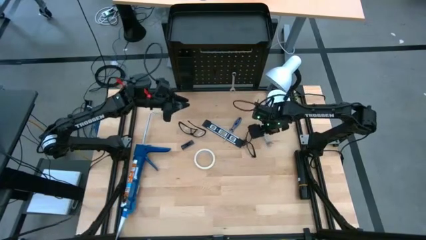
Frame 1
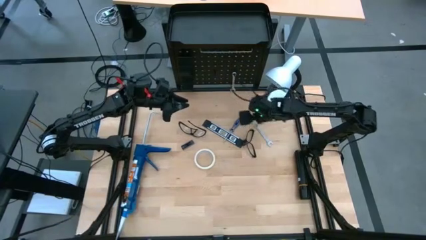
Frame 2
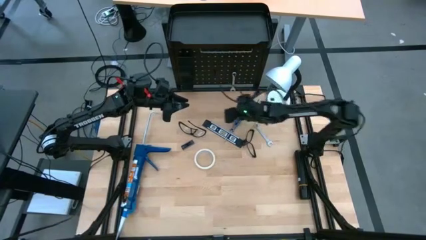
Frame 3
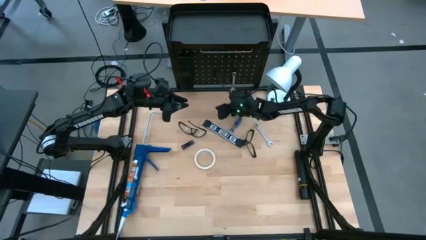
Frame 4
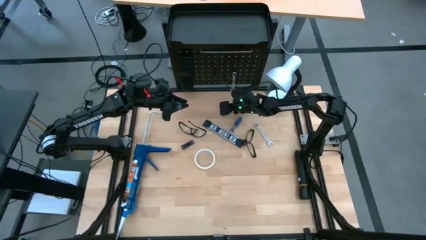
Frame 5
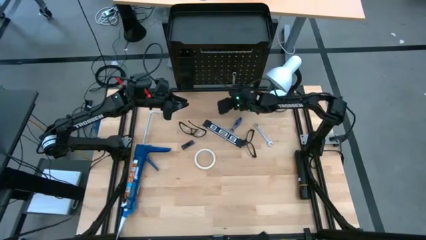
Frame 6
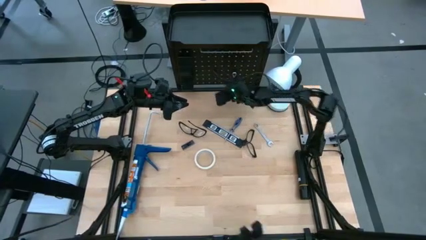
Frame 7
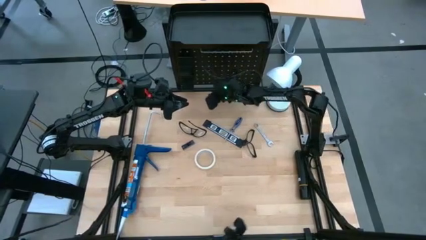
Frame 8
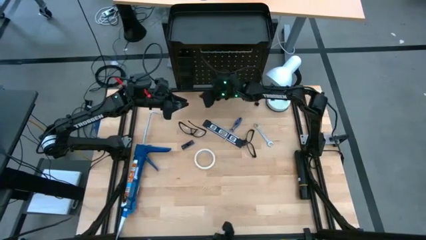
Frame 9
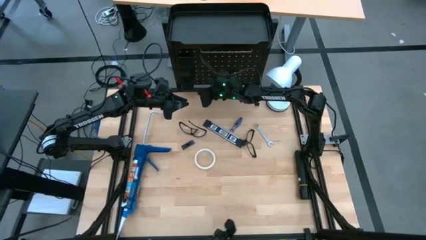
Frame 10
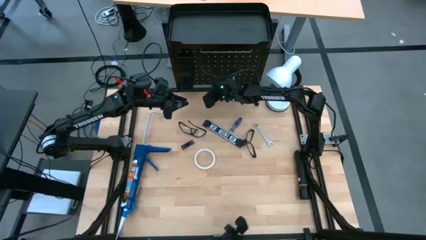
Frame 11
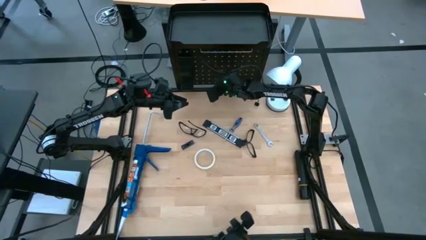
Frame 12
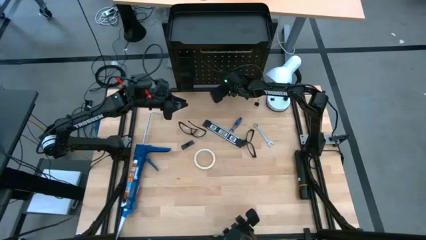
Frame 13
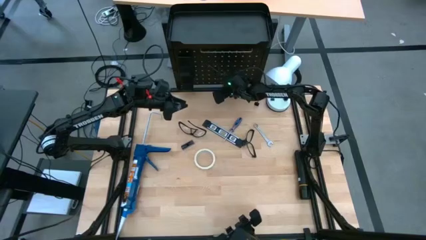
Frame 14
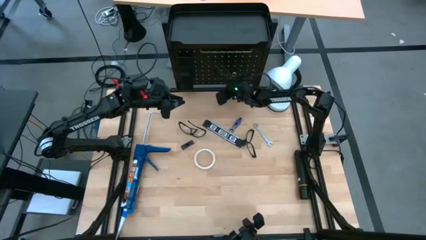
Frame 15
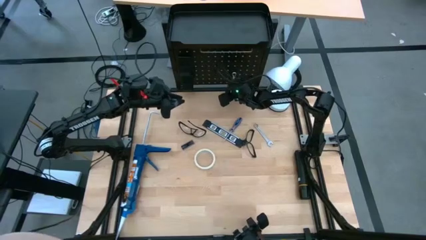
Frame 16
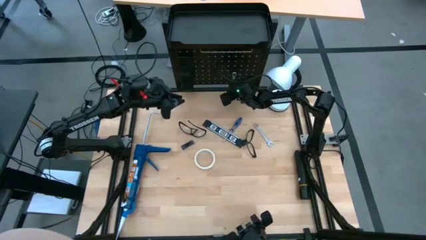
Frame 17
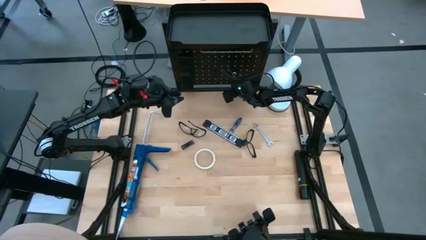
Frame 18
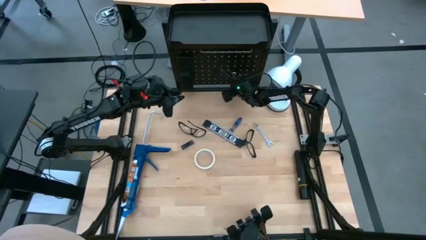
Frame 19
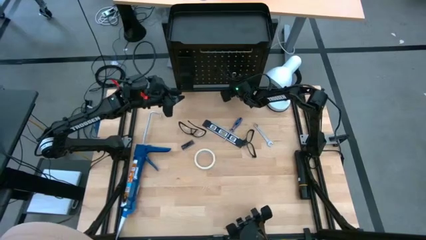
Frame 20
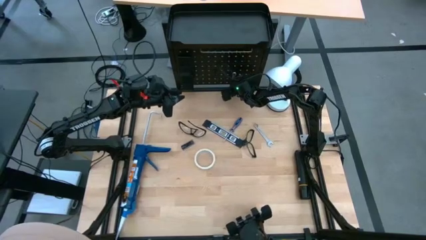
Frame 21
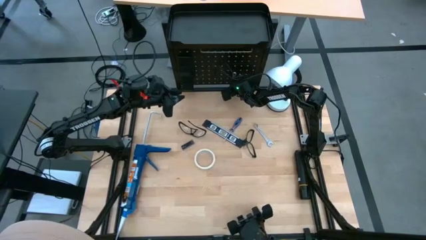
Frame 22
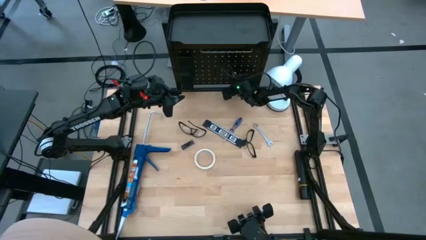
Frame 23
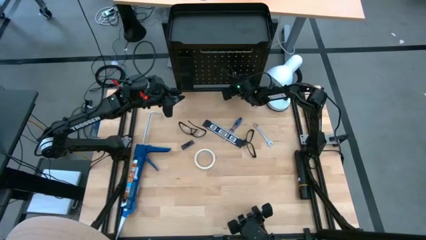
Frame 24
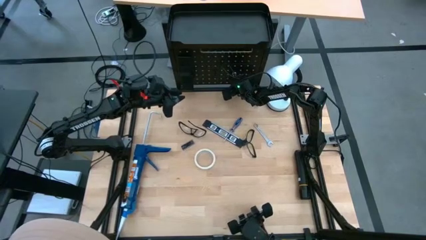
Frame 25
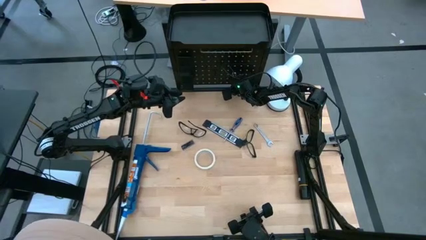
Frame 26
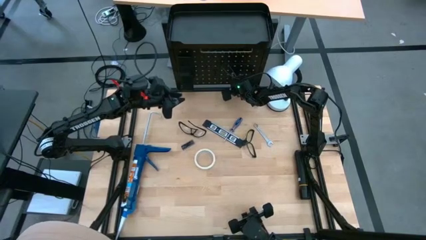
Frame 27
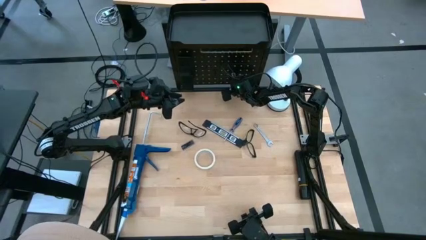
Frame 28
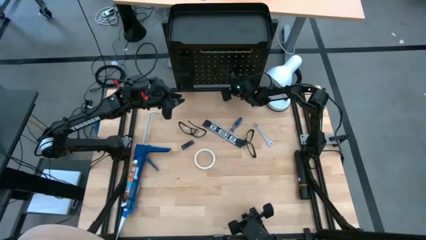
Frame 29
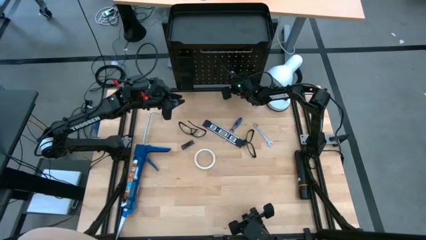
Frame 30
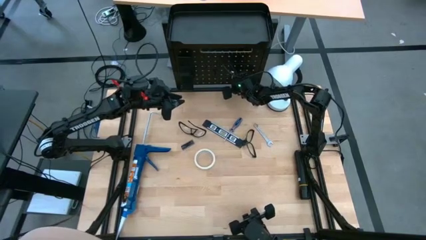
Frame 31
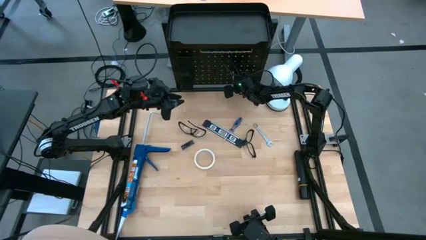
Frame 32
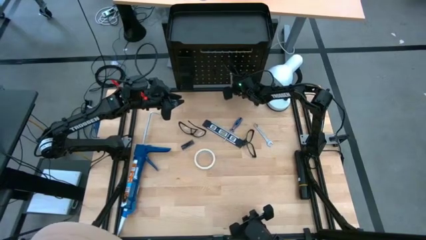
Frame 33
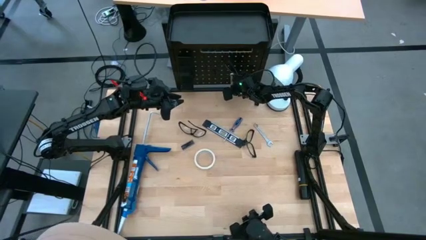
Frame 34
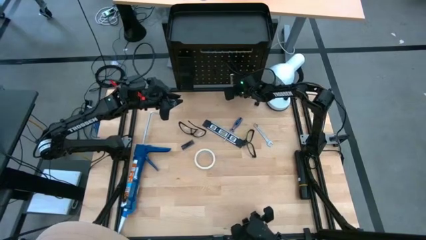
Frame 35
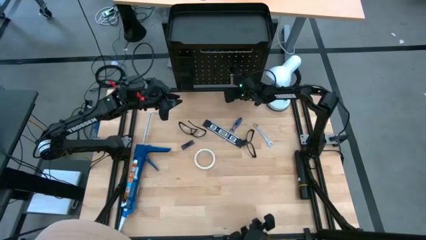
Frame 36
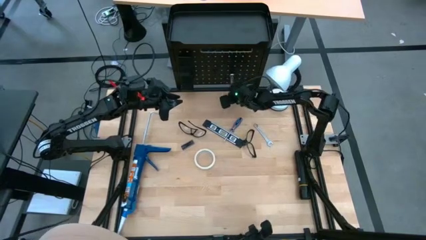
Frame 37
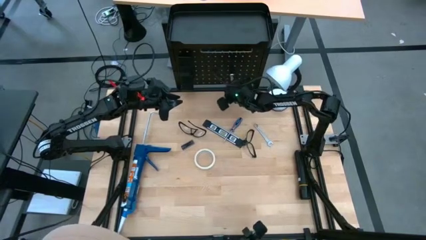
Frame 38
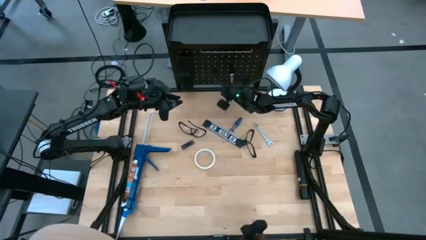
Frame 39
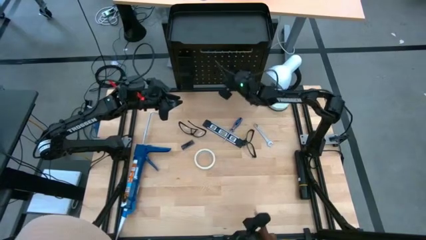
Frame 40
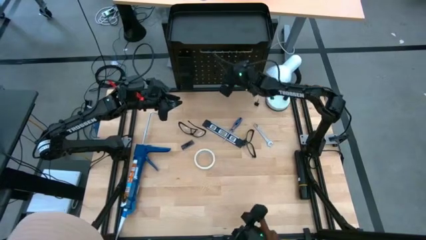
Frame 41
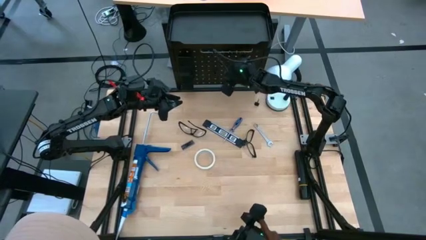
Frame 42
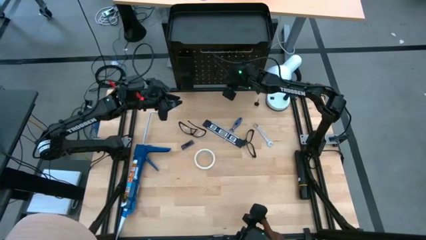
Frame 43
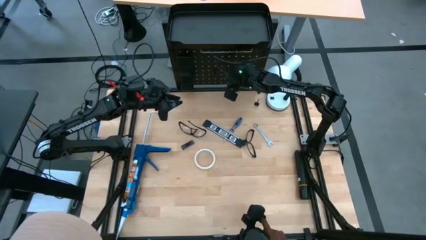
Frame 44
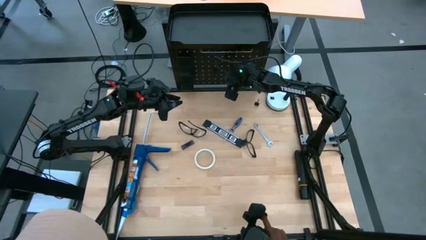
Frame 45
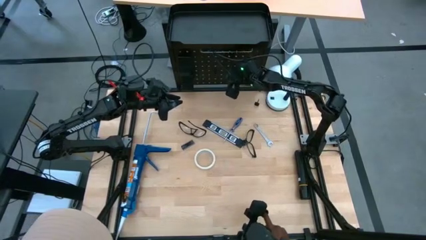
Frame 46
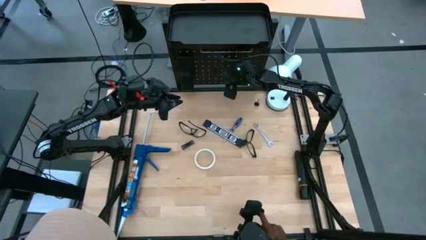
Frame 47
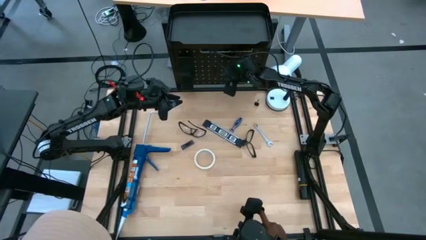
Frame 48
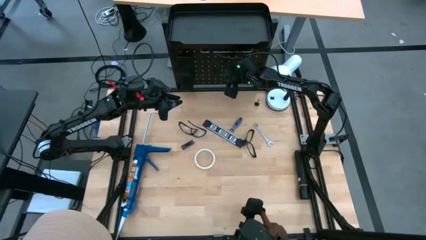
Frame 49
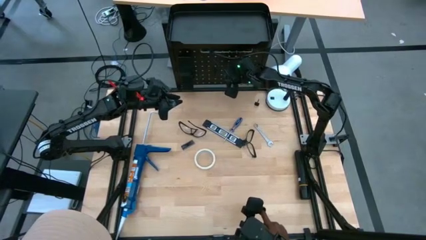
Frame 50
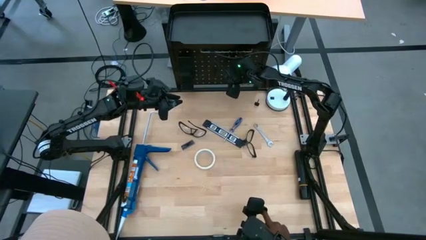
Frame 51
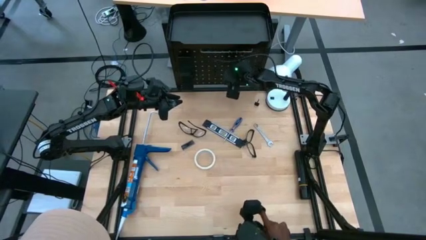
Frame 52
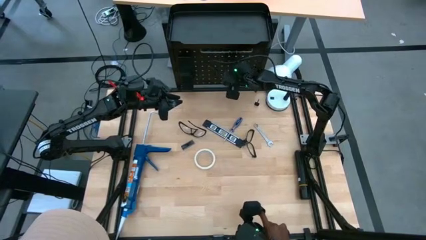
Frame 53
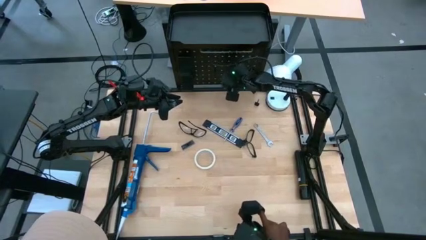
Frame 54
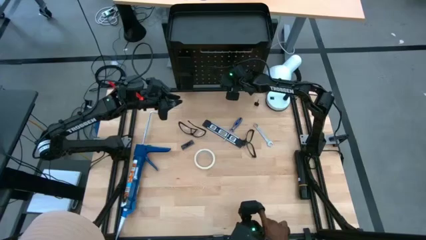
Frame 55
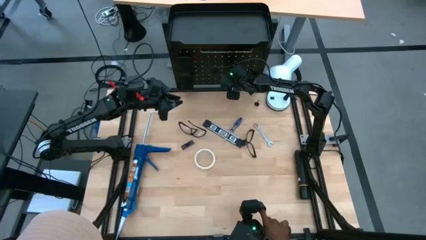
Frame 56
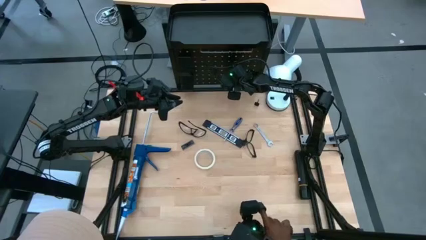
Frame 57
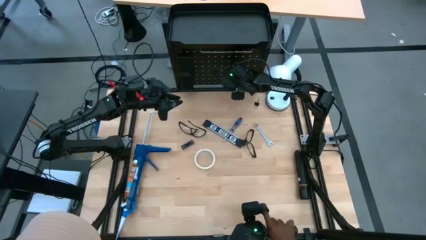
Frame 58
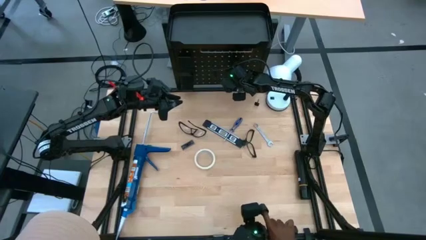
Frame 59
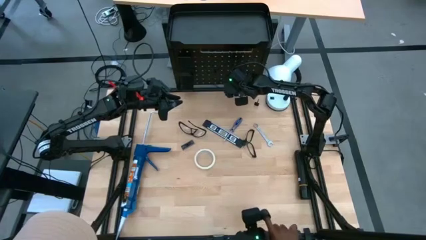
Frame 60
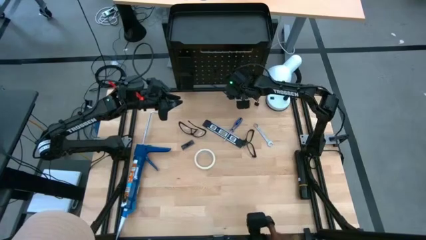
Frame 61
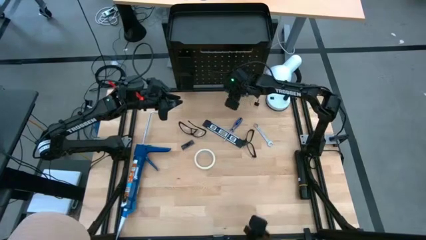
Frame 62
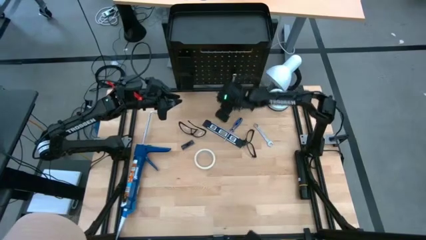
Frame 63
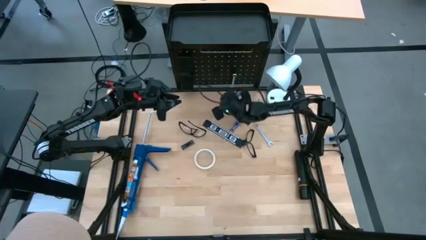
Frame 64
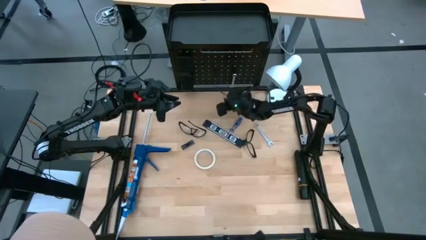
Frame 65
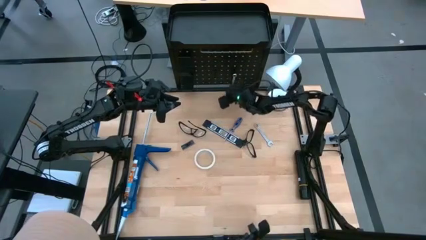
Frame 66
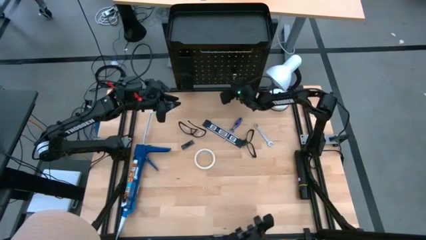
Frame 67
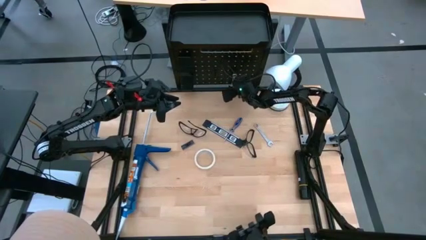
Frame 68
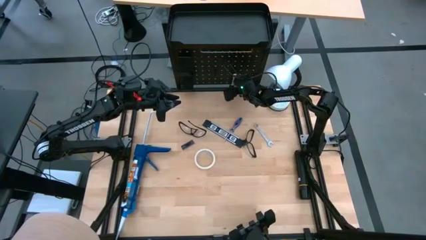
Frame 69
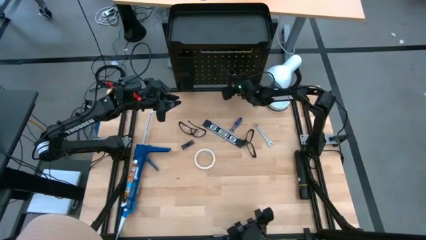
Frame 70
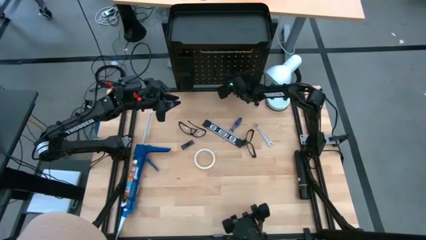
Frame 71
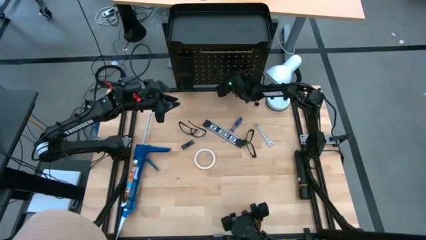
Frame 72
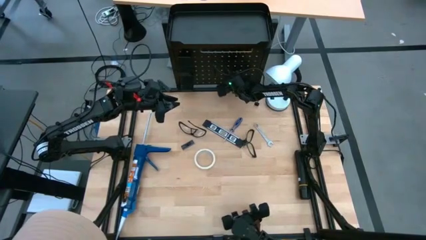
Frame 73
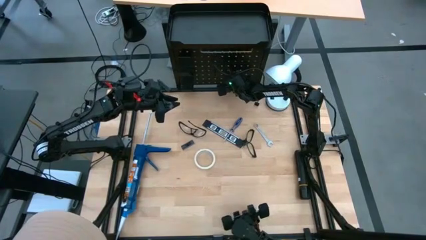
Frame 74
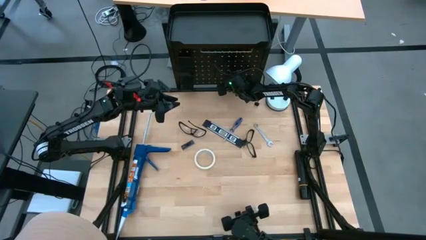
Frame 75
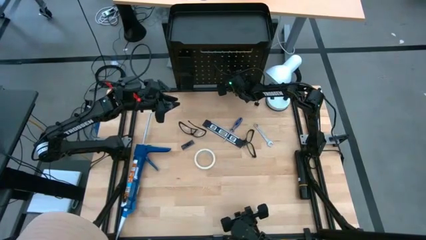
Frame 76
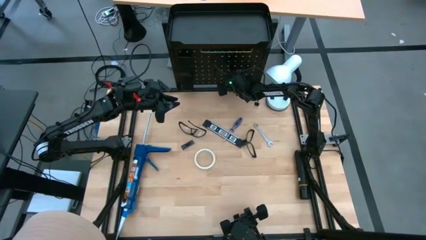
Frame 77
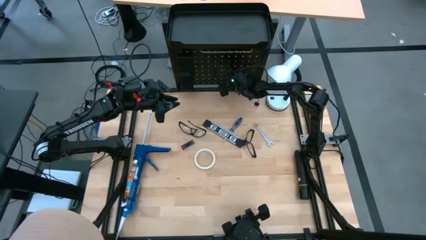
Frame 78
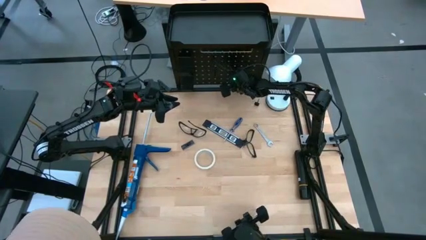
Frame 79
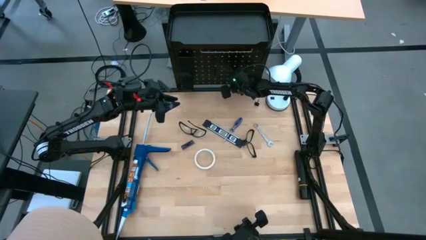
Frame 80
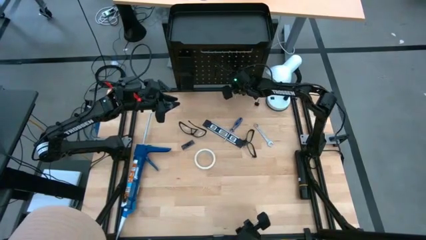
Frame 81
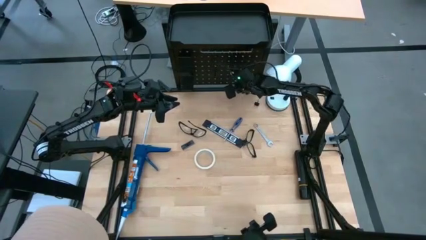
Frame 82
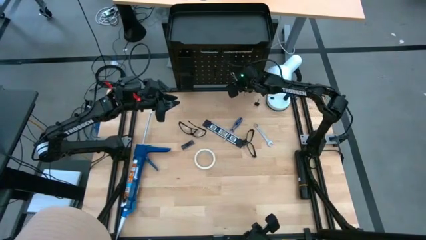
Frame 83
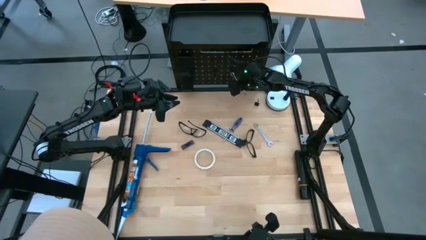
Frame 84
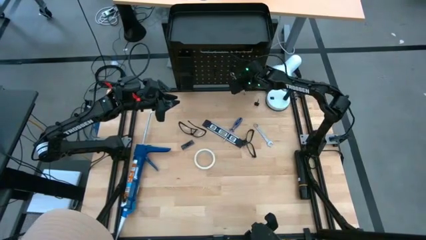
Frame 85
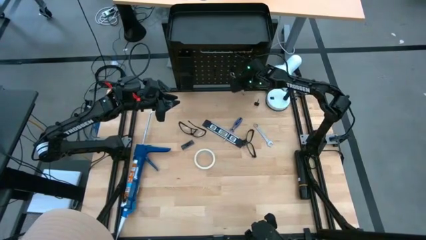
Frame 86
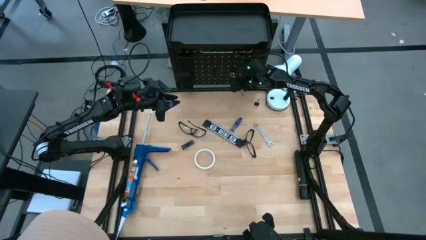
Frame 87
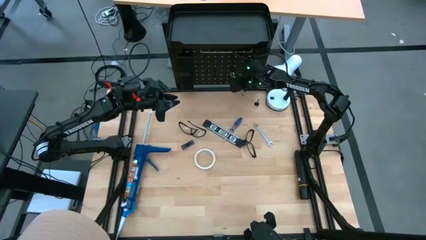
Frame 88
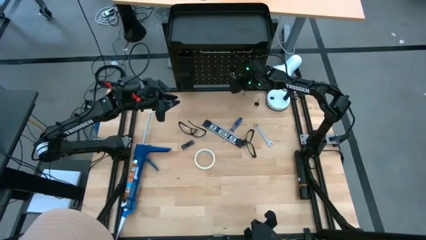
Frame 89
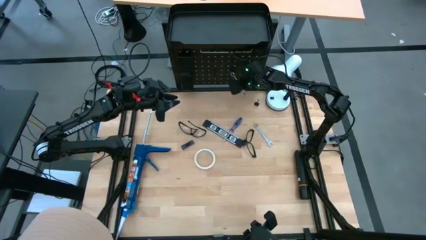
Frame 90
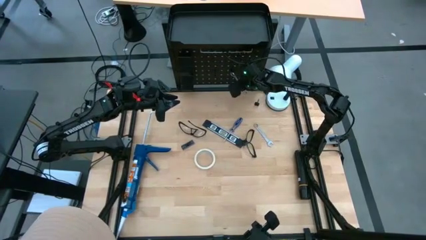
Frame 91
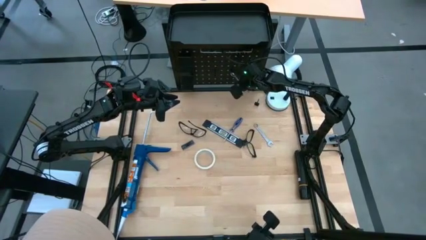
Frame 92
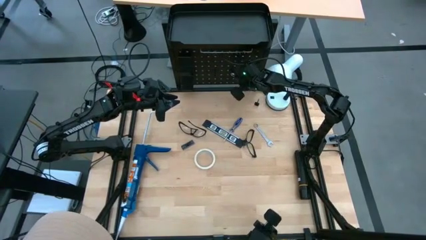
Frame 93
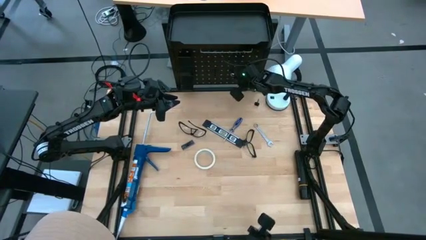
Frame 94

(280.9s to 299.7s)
Task: Hang tools onto peg board
Unhang the wrench from the peg board
